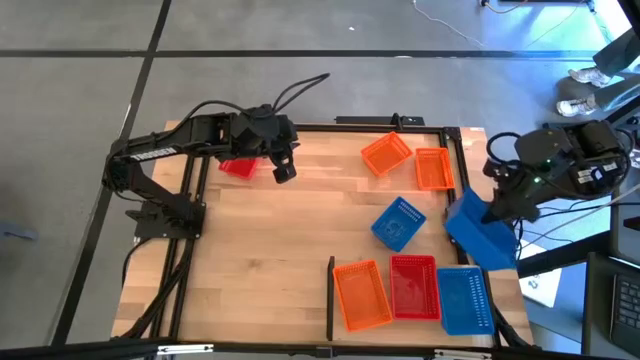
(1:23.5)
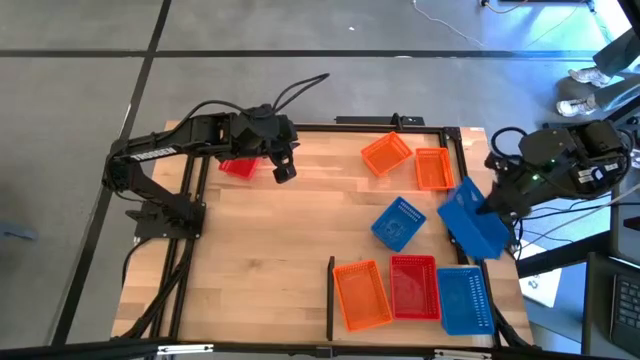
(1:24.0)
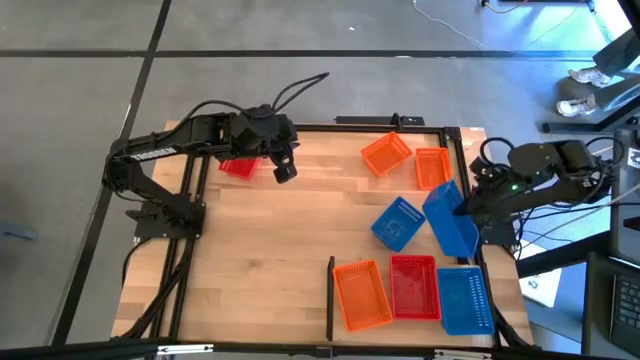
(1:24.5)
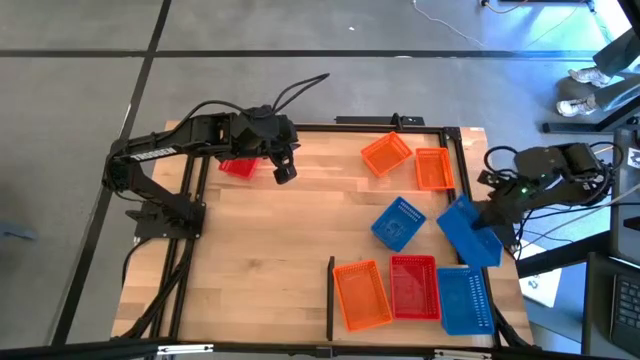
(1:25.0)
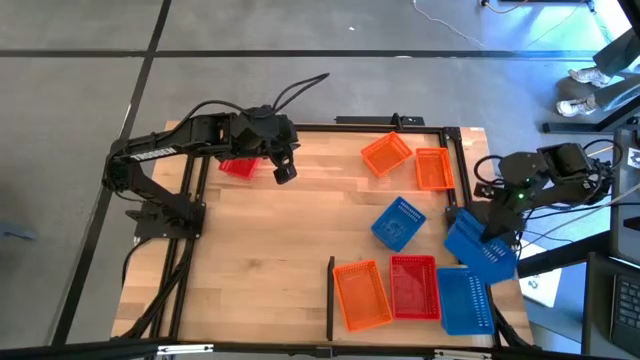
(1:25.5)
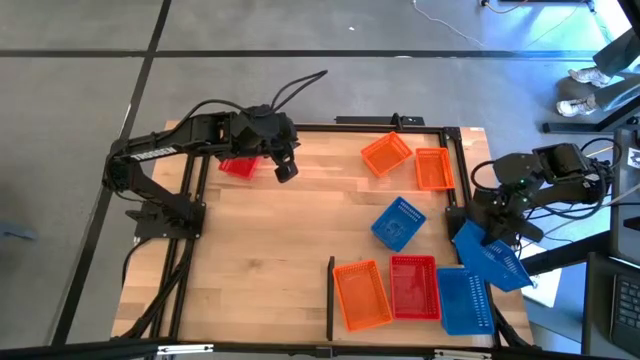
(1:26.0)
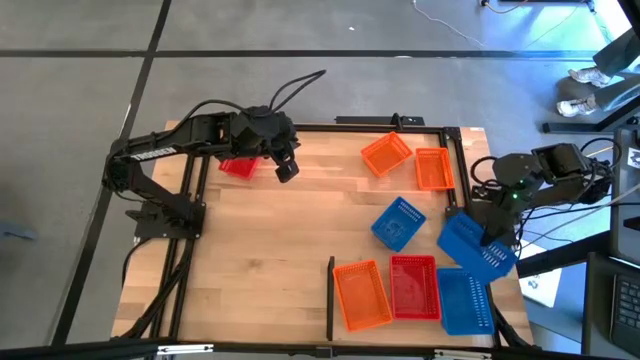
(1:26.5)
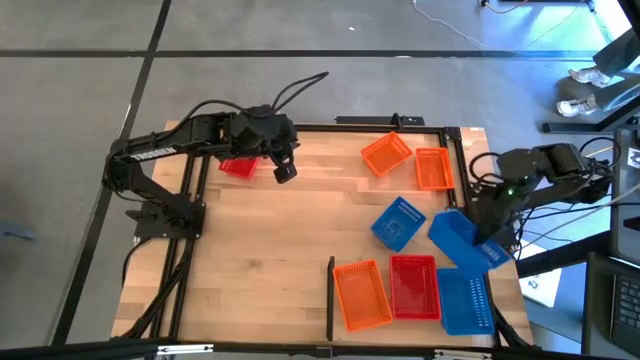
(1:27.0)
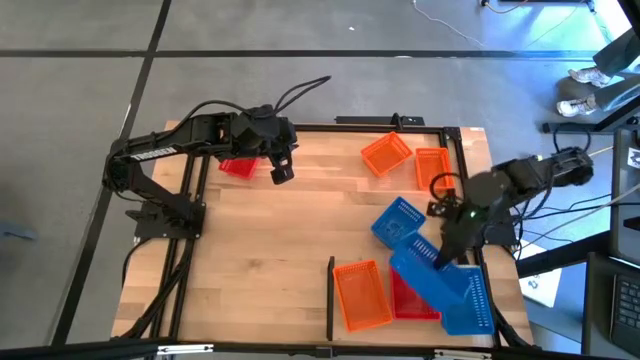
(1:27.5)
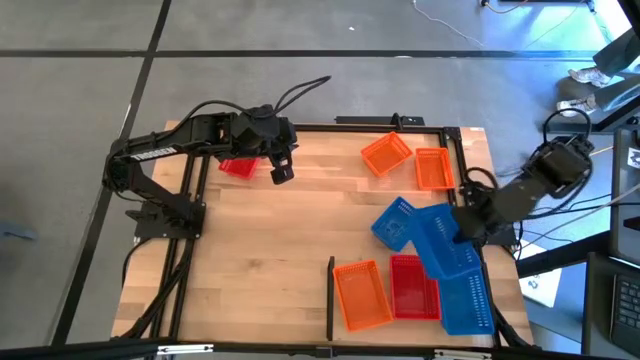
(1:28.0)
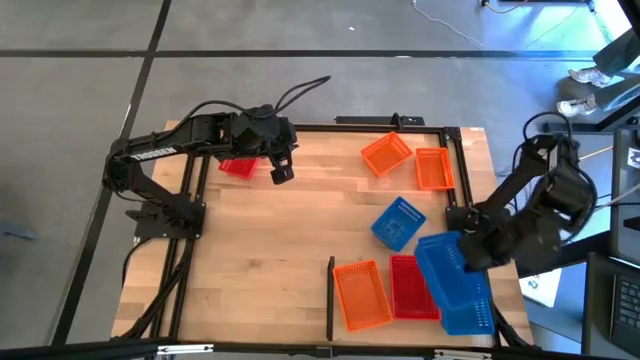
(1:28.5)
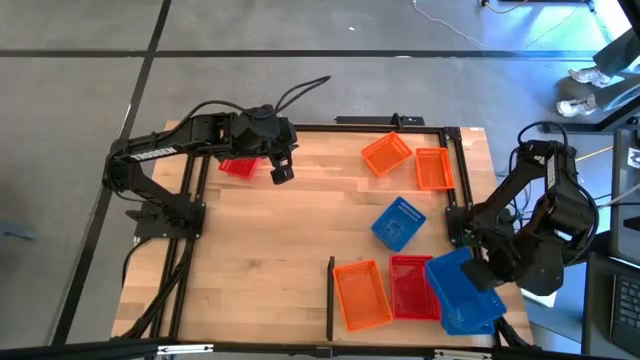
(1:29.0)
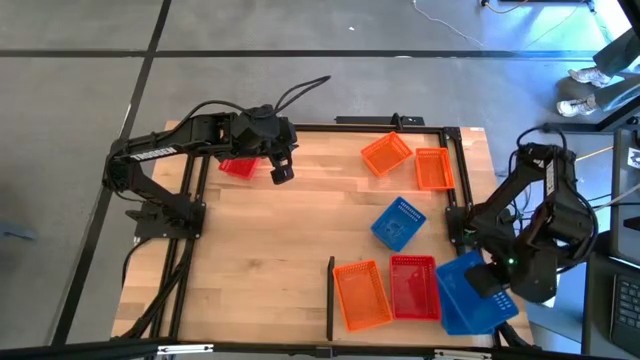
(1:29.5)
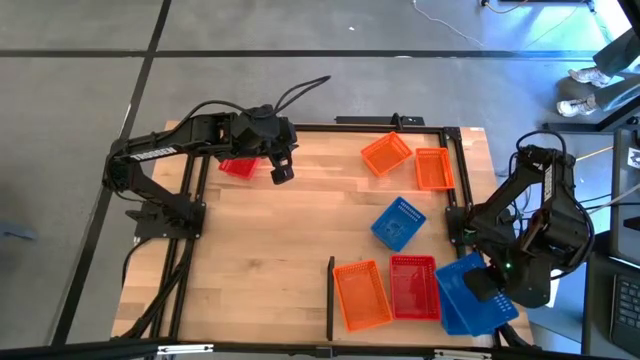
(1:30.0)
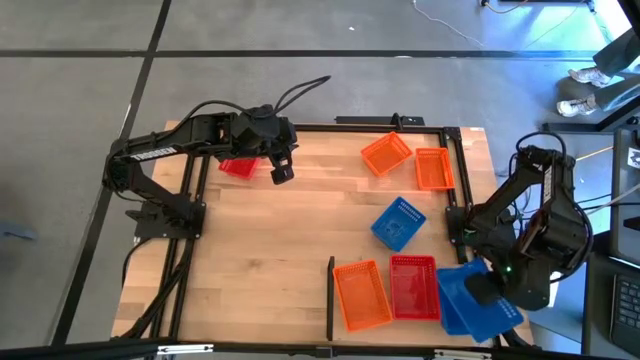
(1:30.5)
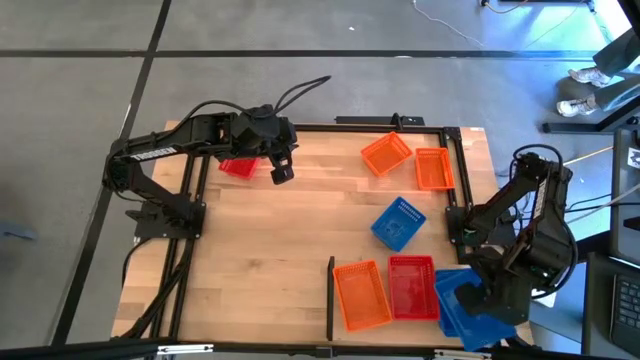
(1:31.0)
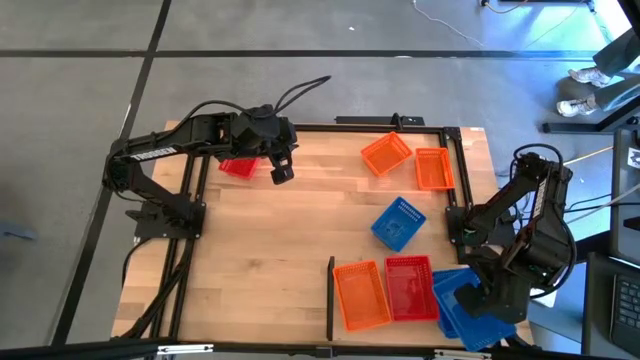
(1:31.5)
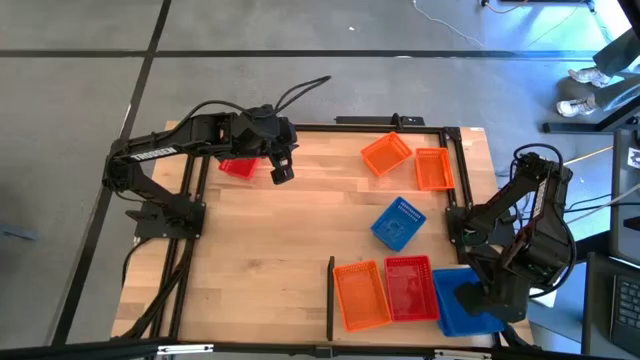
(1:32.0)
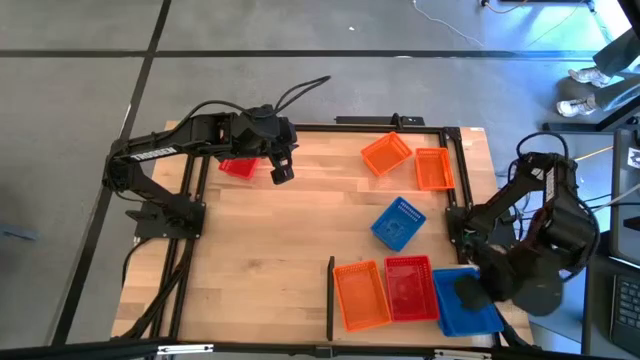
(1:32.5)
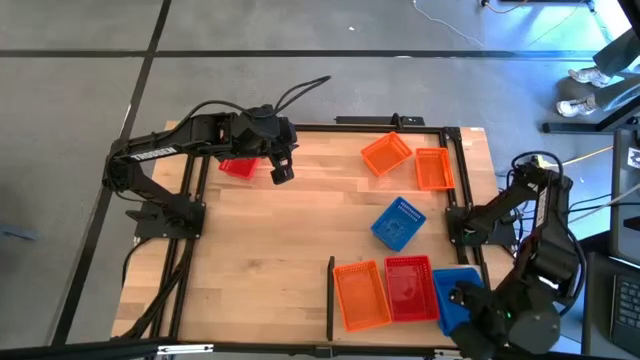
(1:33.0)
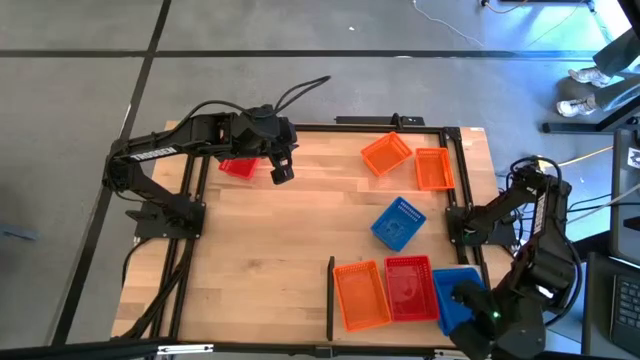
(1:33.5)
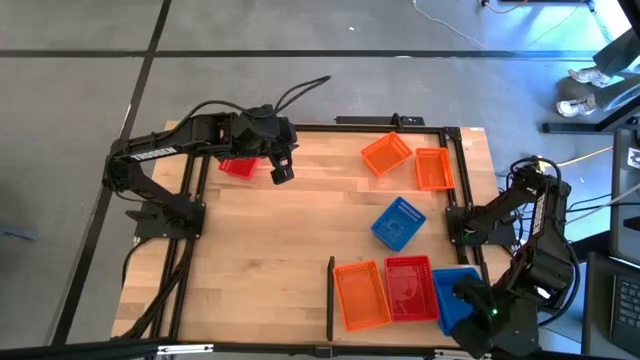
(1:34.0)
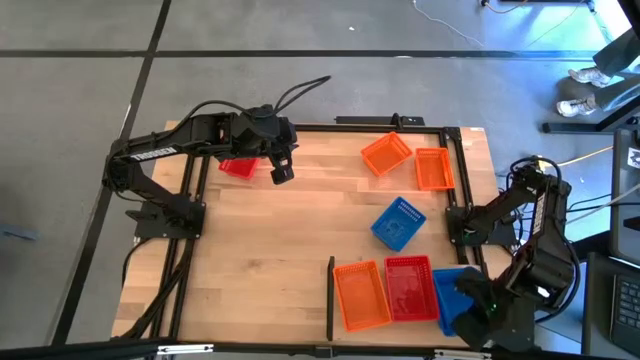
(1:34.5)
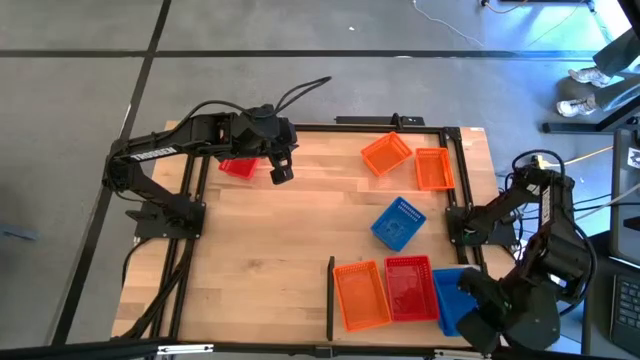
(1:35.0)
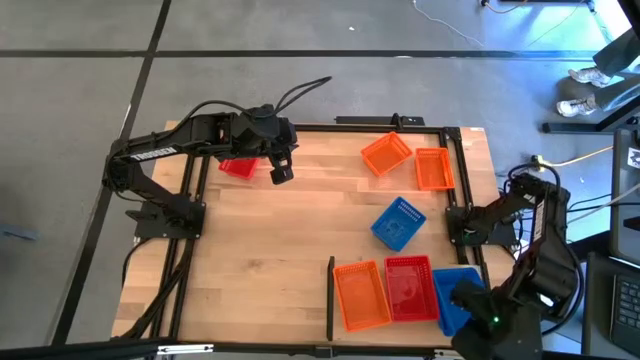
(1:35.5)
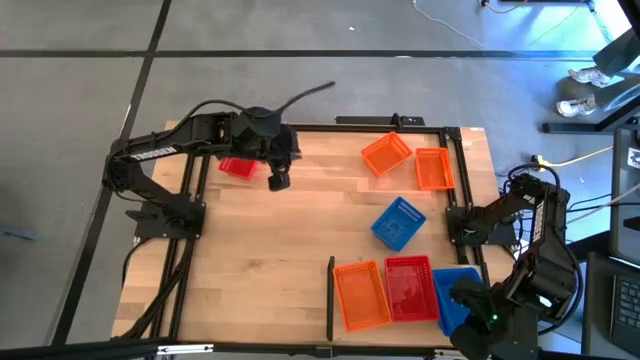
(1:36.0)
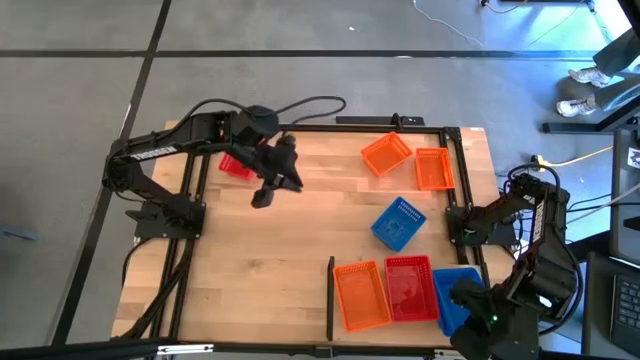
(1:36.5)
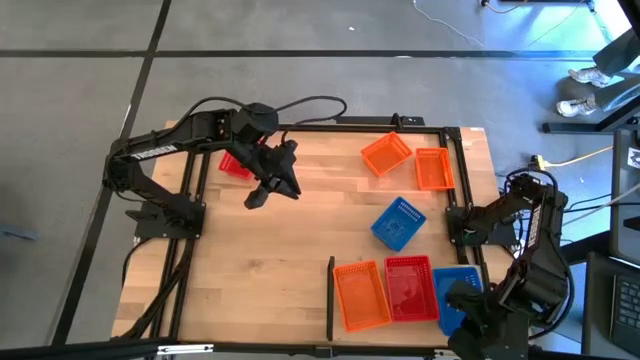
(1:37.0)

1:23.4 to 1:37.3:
Task: Stack baskets on shelf by color
Stack the top blue basket on top of the blue basket on the shelf

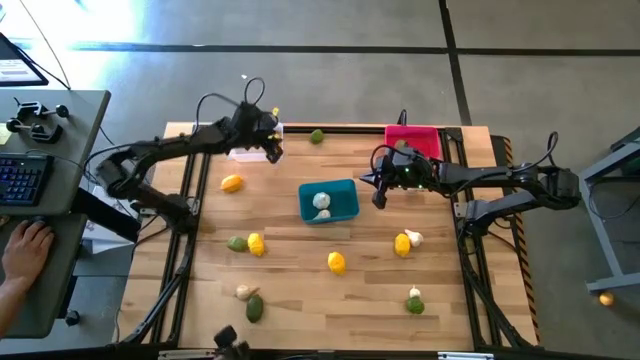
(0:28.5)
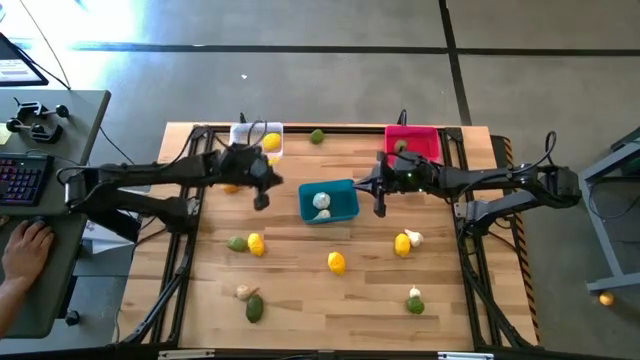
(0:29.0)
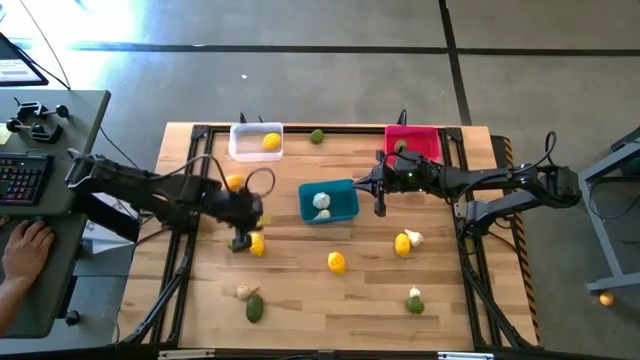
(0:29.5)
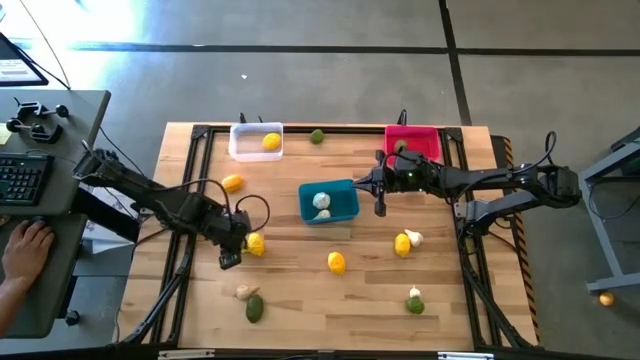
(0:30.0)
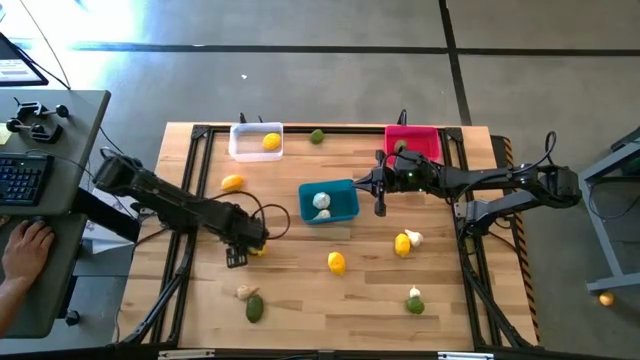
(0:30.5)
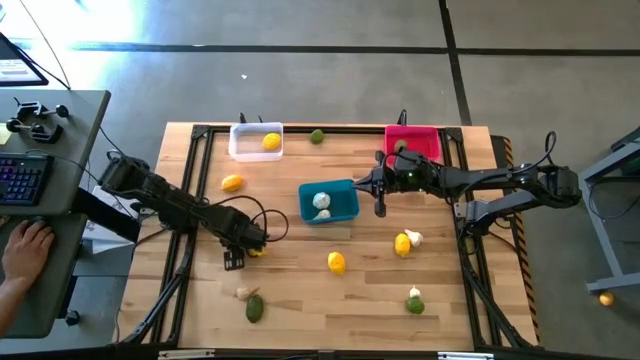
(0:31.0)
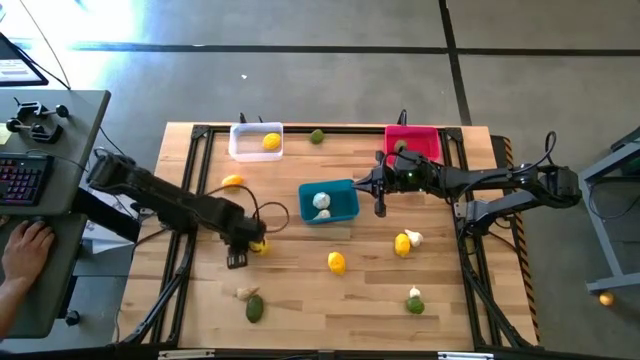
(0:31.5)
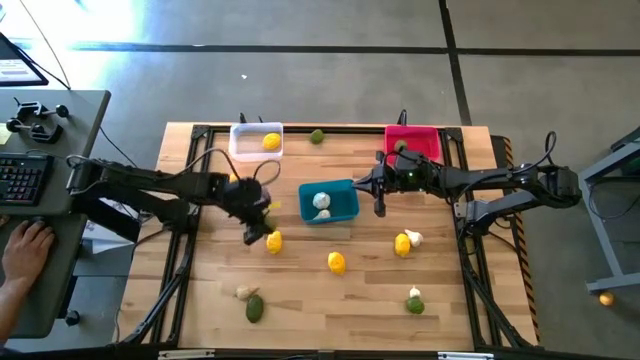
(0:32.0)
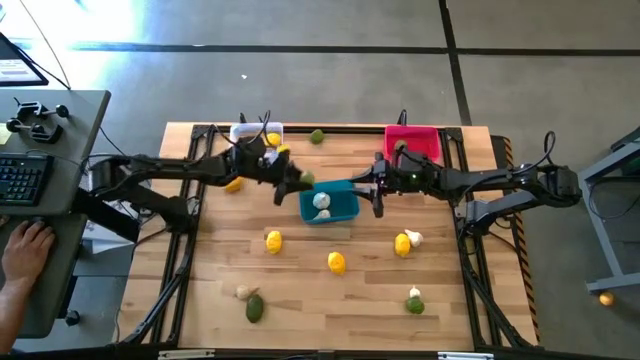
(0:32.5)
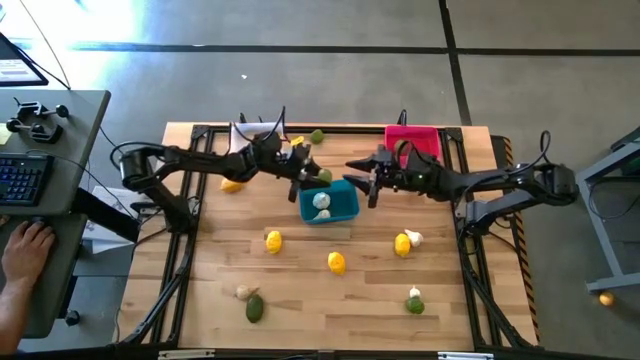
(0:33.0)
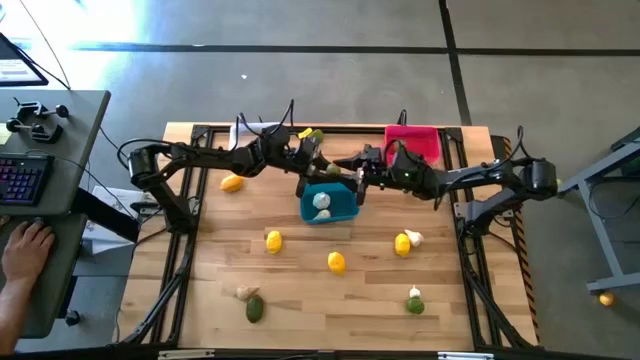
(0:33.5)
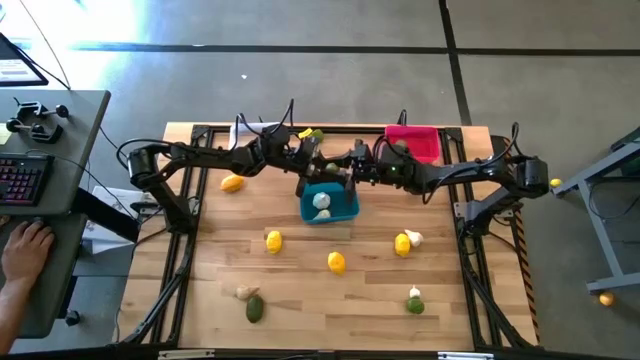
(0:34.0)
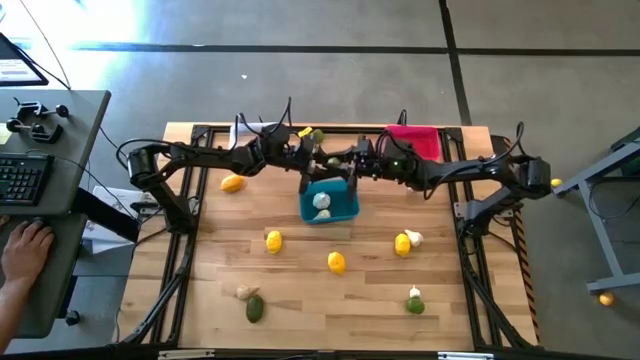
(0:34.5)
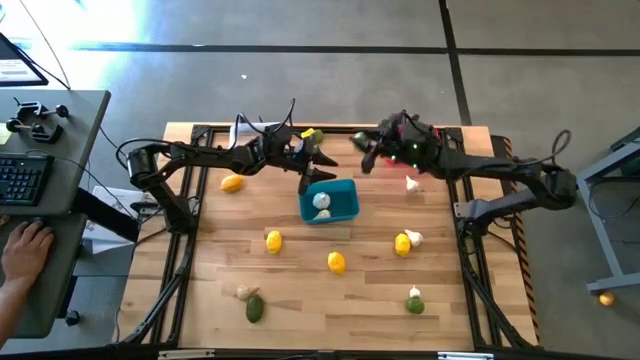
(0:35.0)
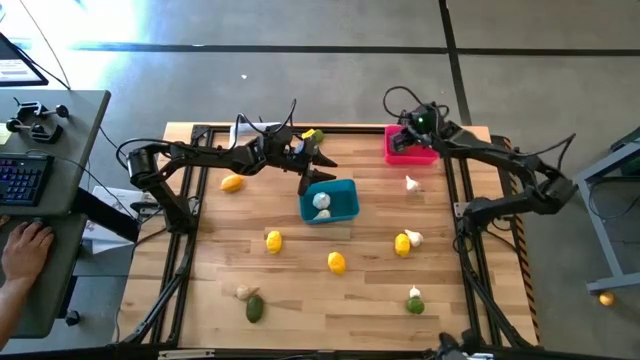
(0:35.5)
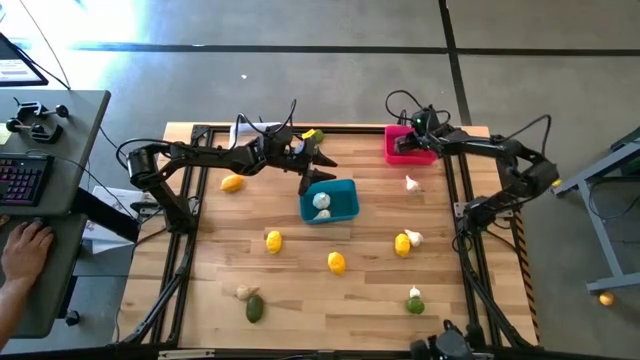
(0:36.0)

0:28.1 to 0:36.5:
Task: Sort produce into baskets
Put the green lime into the pink bin
